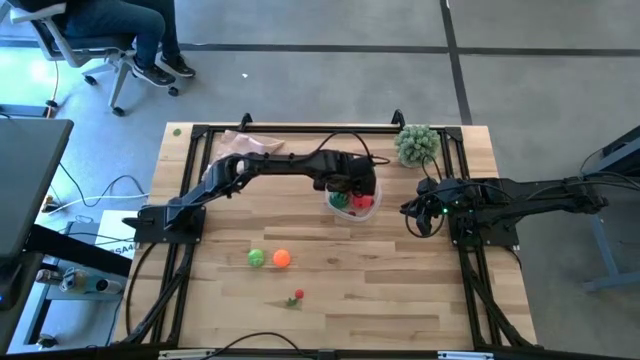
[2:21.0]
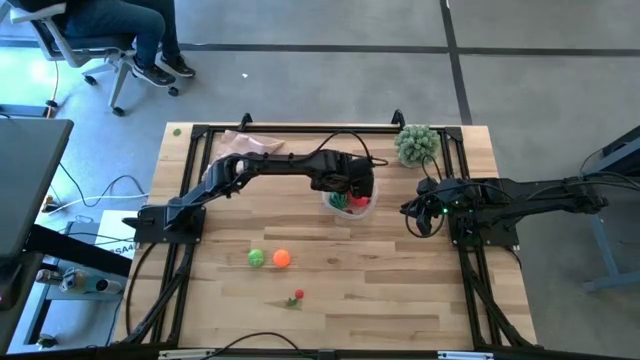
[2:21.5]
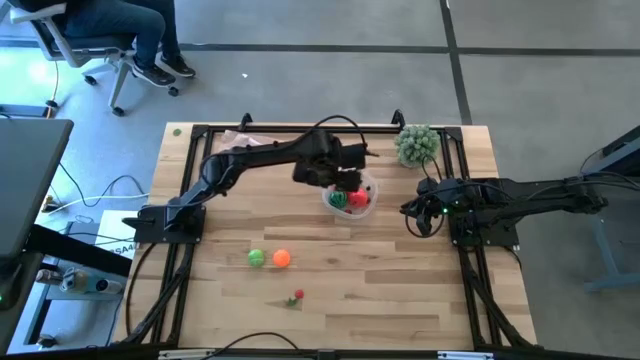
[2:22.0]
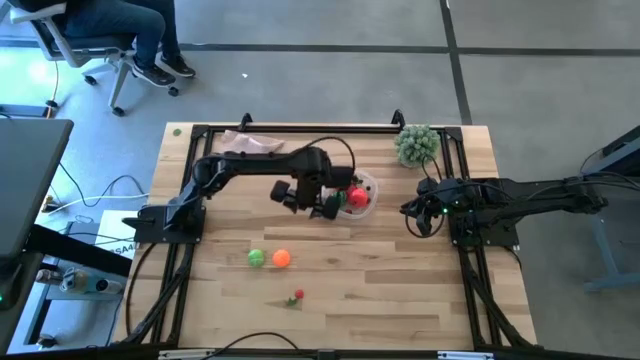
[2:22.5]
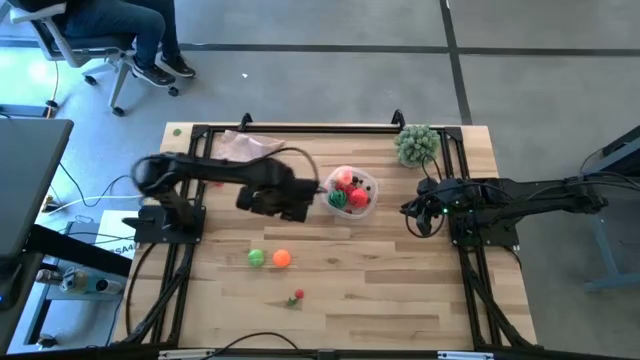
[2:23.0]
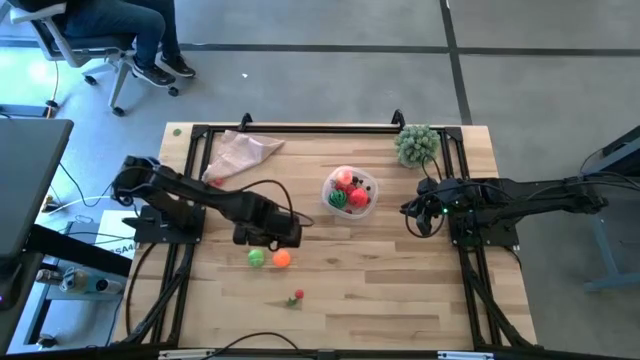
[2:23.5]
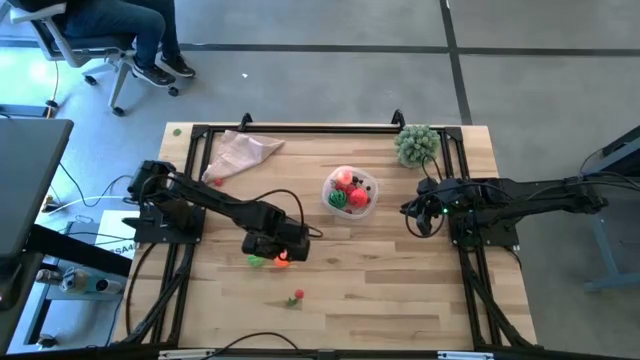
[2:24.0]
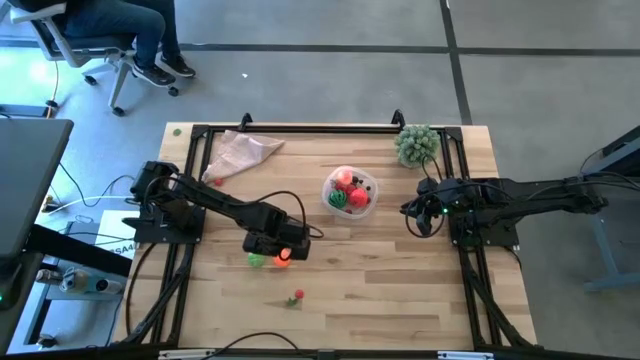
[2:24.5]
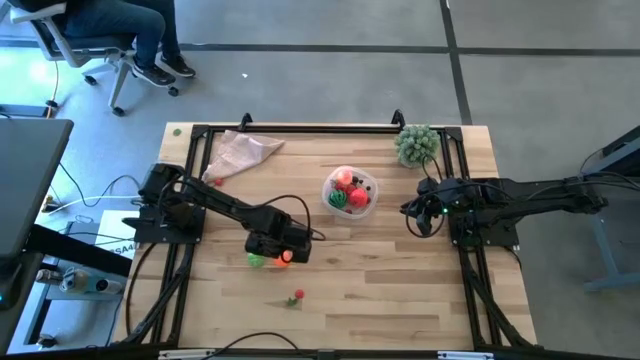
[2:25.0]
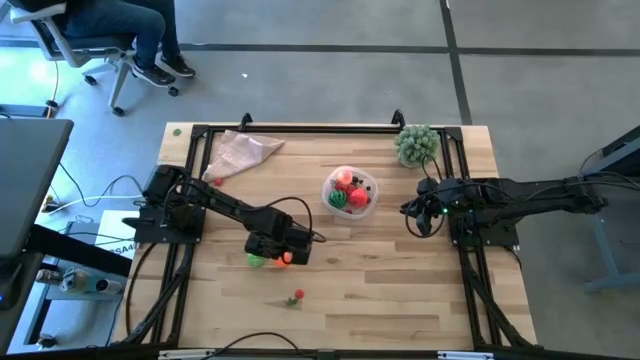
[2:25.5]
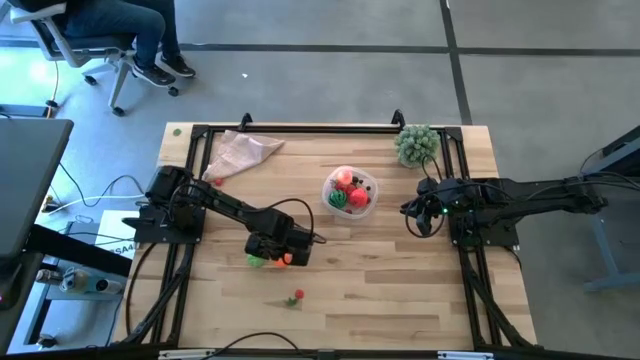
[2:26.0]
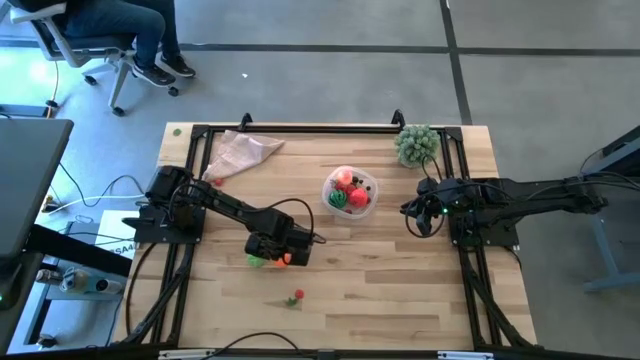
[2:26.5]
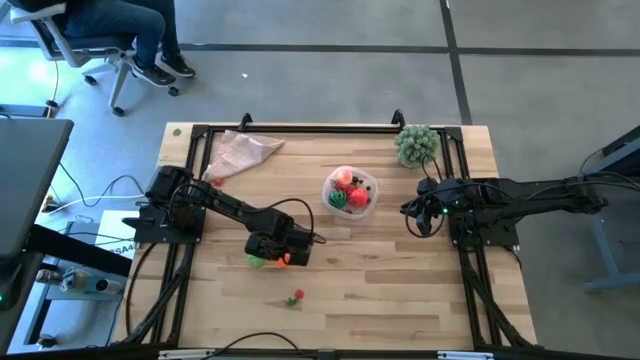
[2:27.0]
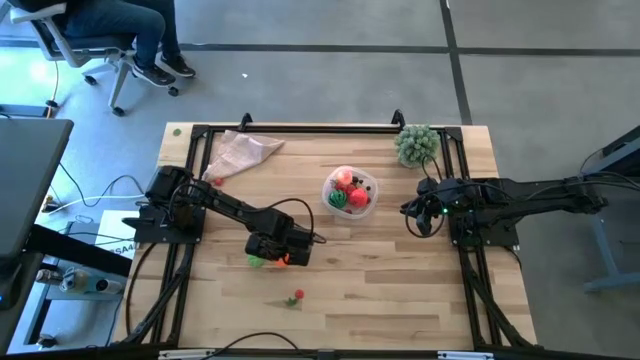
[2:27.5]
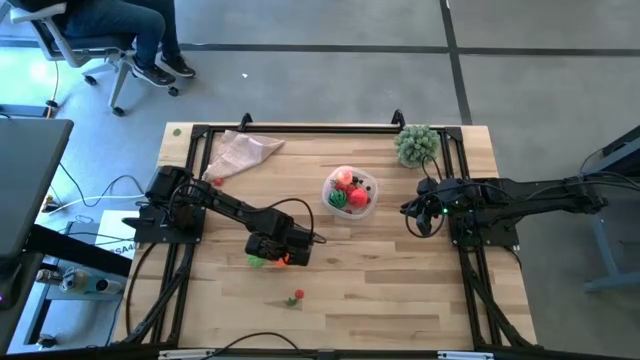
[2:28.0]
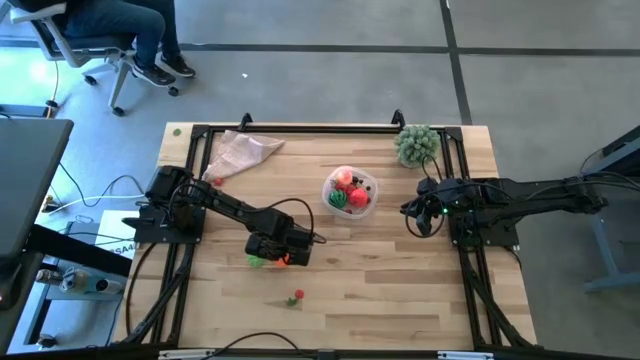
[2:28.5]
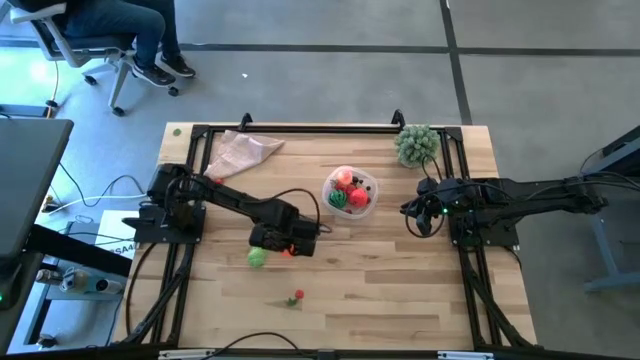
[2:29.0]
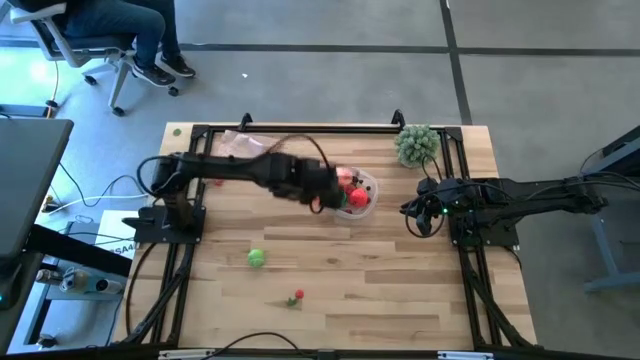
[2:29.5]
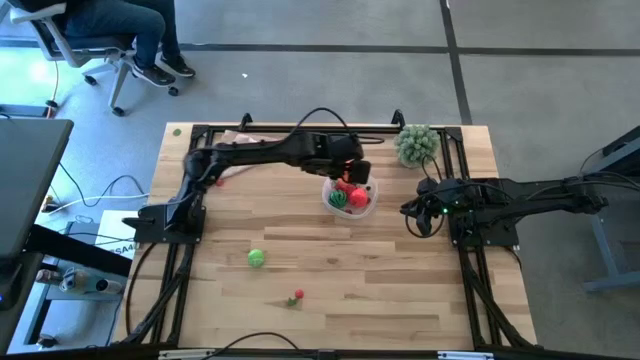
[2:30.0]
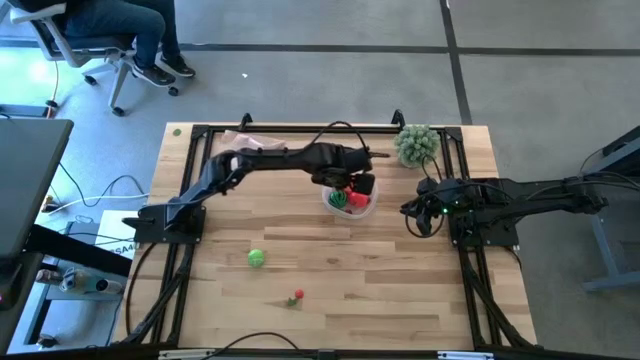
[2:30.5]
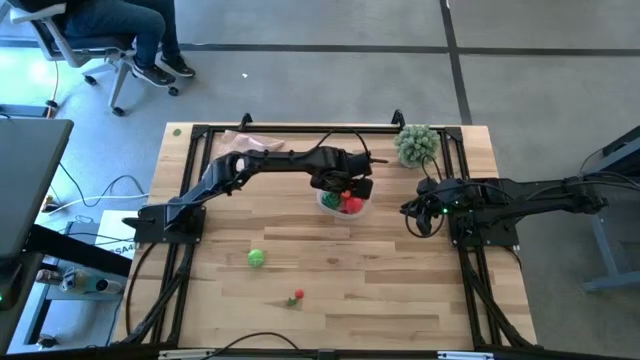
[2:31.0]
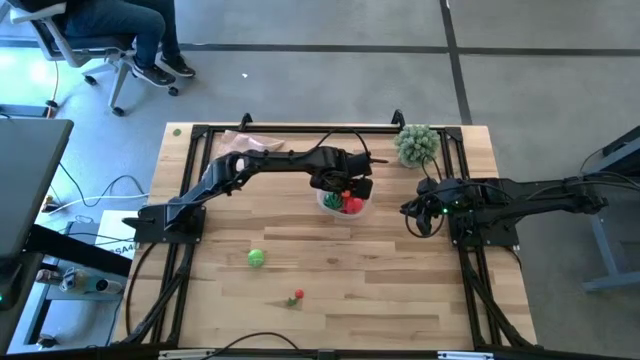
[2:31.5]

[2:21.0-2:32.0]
Task: Pick and placing Produce into tupperware
Put the pumpkin into the transparent bin

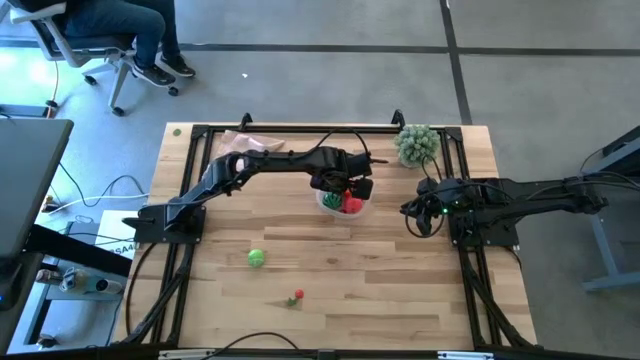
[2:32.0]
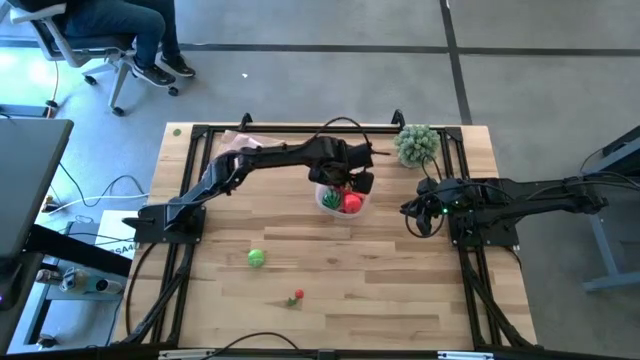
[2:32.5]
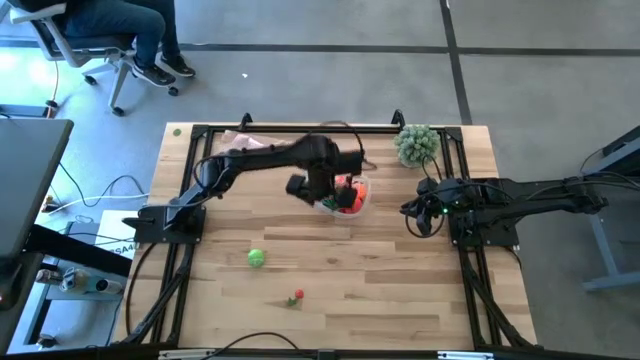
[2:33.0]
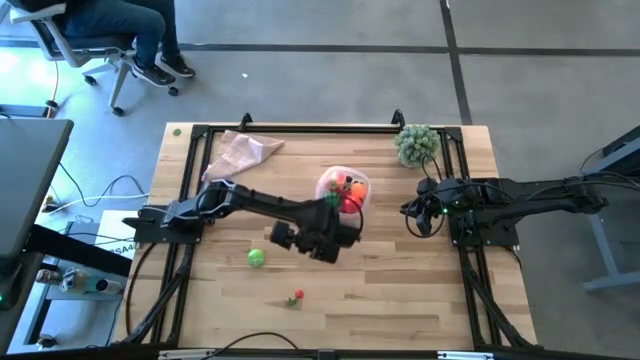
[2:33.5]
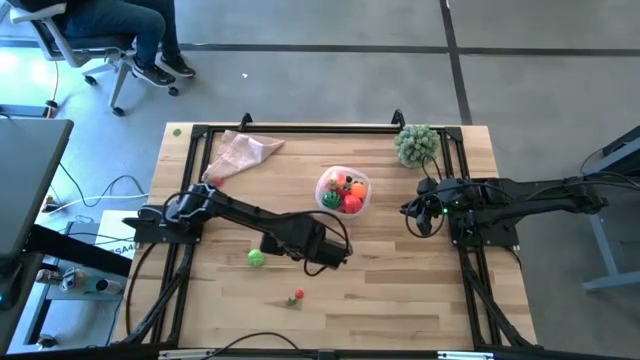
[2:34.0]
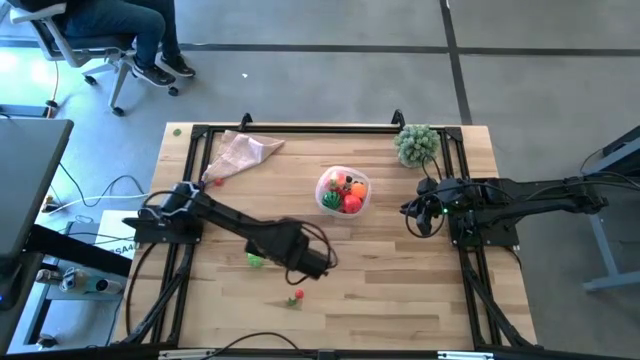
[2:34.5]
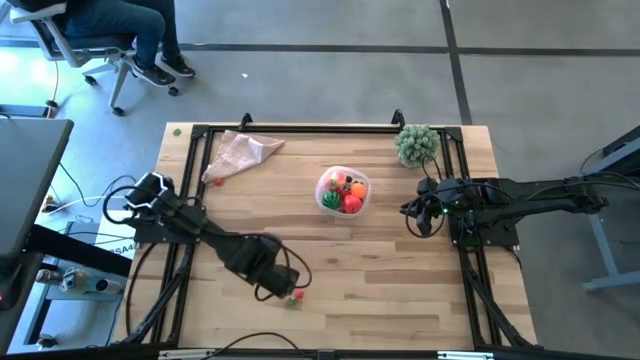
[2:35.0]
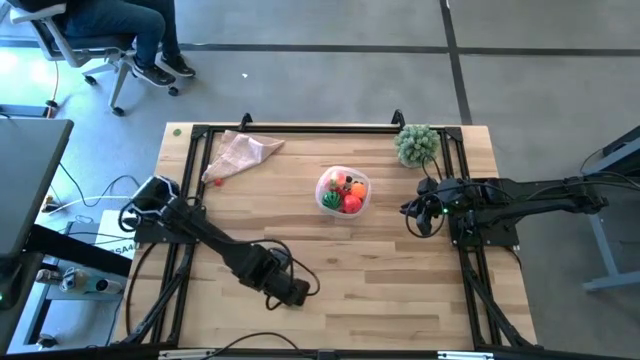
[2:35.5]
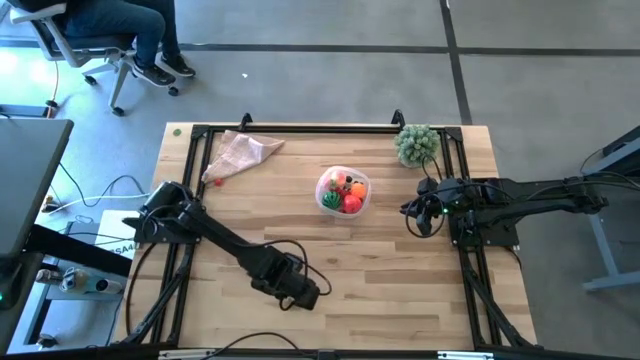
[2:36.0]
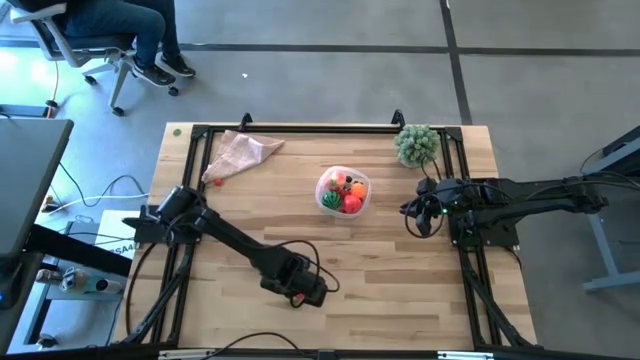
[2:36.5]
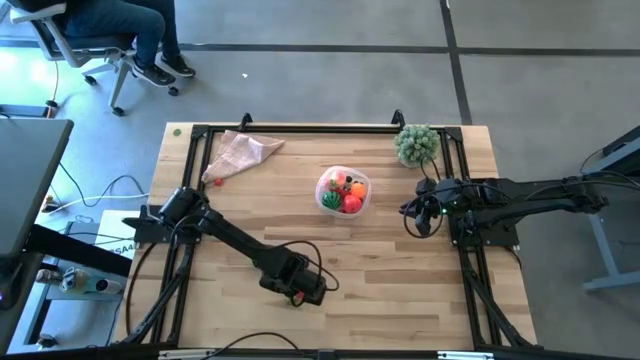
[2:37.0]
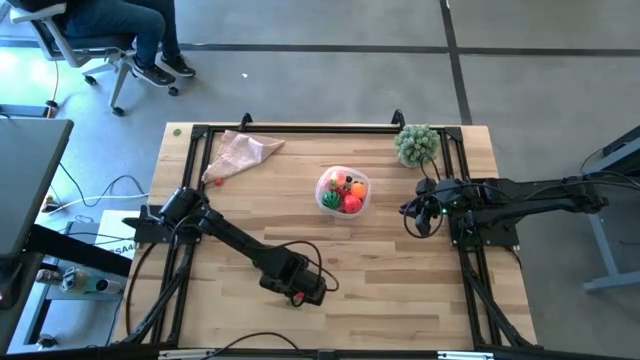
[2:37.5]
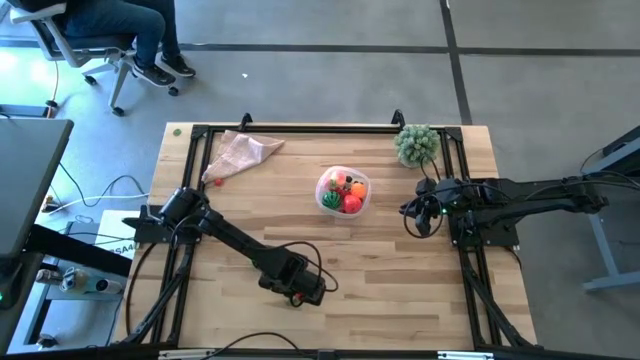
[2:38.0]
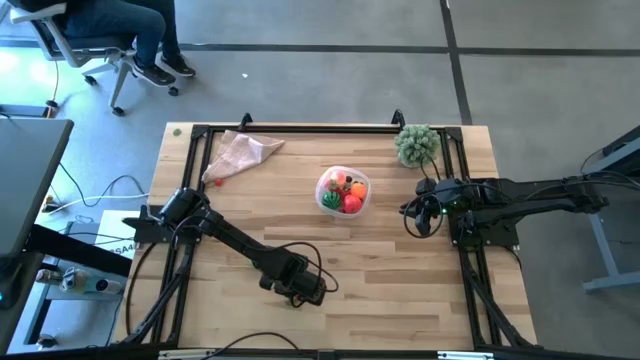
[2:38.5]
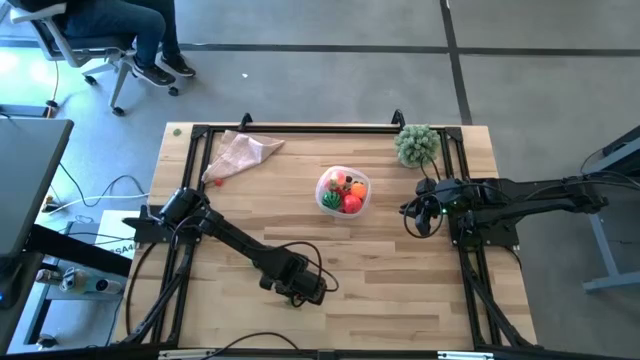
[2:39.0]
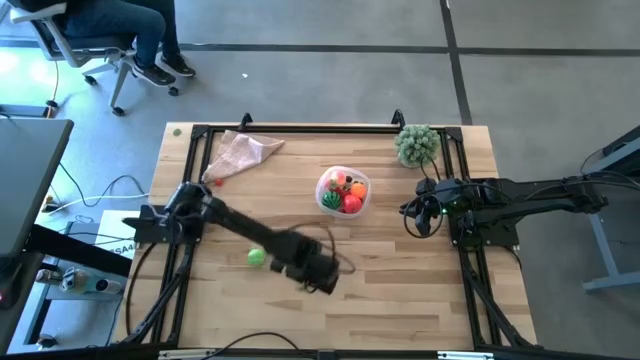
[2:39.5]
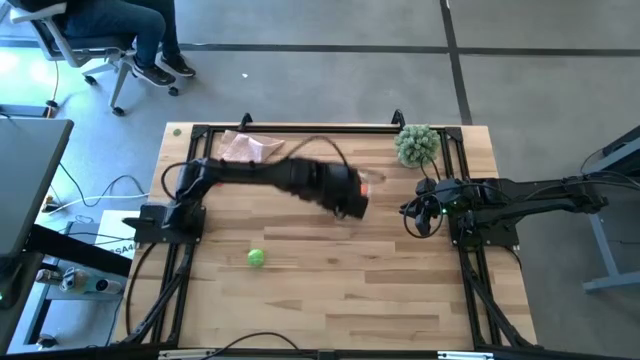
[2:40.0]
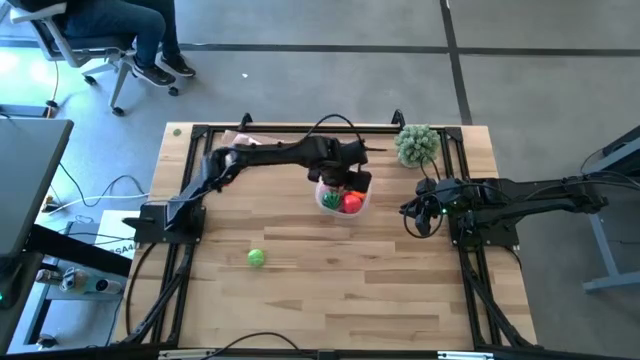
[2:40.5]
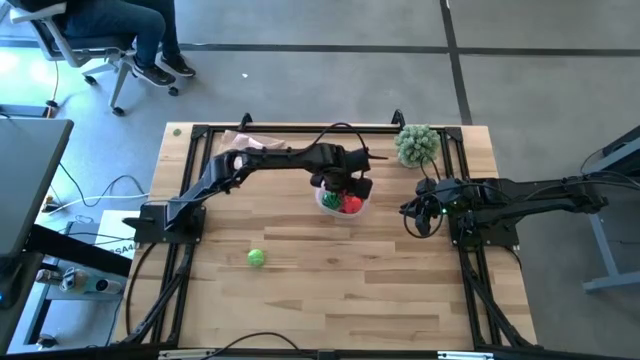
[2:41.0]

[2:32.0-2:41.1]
Put the cherry into the transparent bin

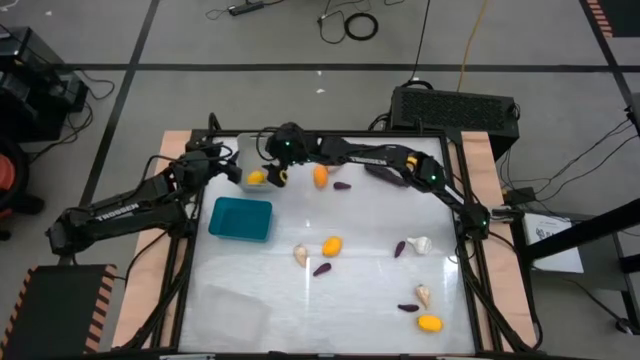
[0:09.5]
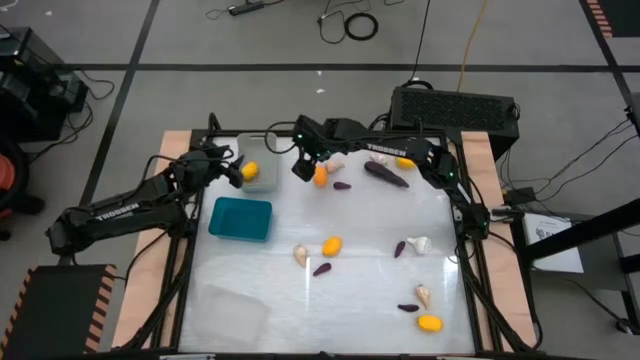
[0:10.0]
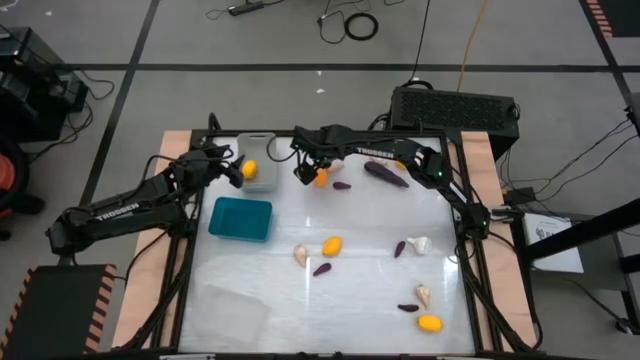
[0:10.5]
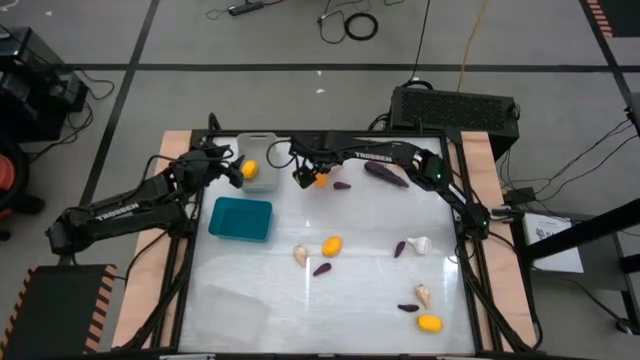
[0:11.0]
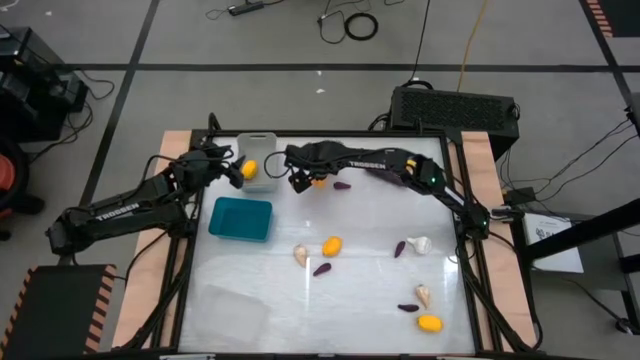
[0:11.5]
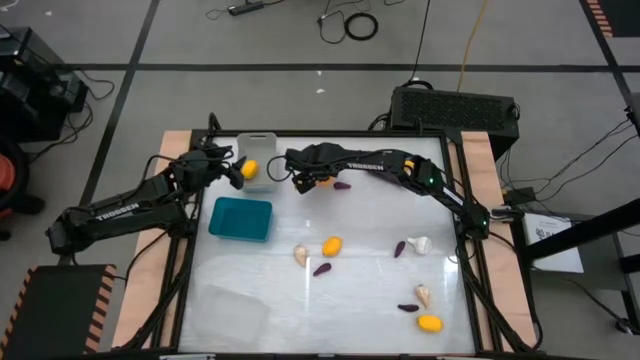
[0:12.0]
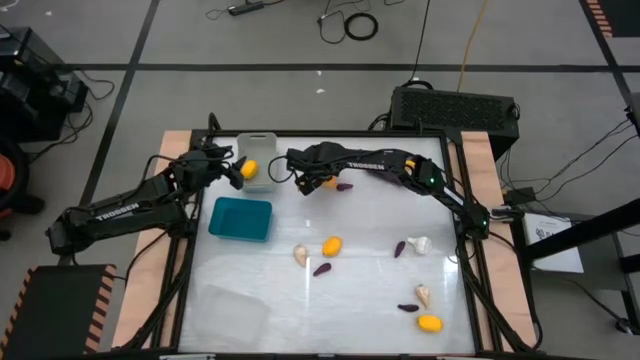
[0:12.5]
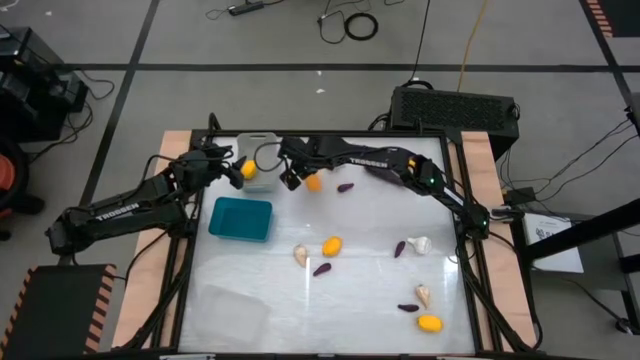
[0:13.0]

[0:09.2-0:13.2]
Task: Sort produce into baskets
Put the yellow lemon into the gray bin
